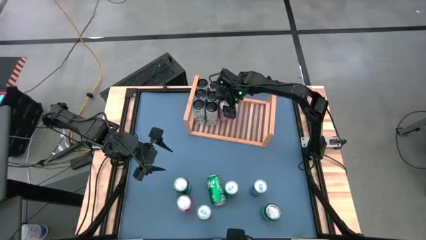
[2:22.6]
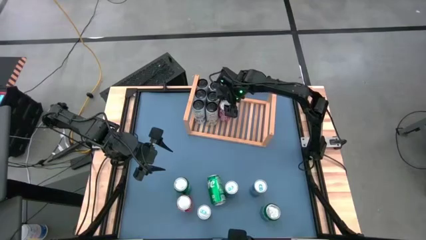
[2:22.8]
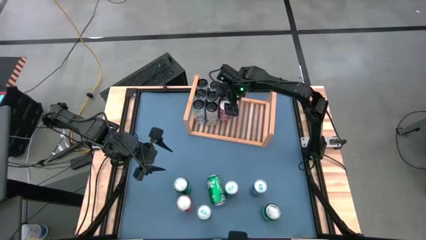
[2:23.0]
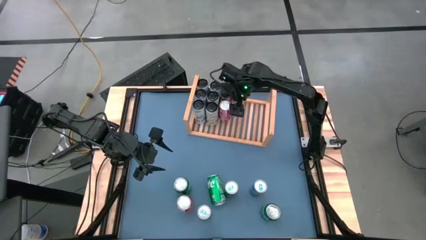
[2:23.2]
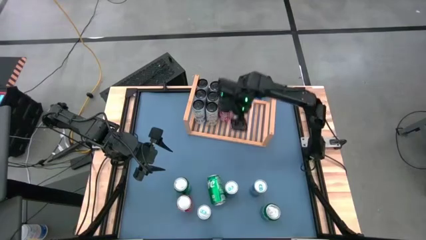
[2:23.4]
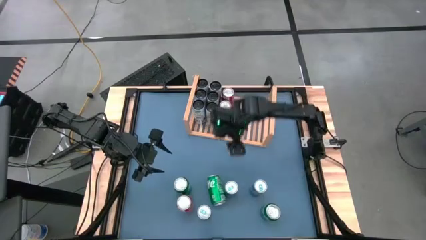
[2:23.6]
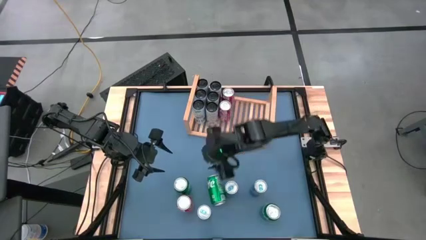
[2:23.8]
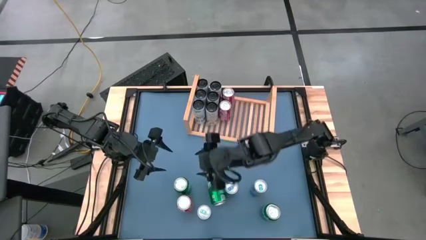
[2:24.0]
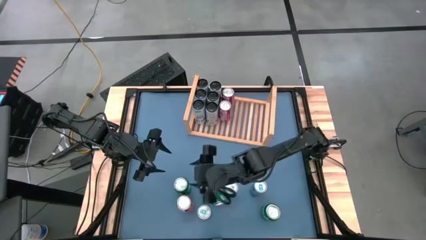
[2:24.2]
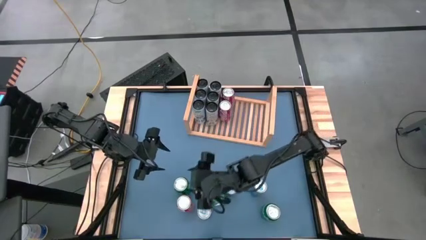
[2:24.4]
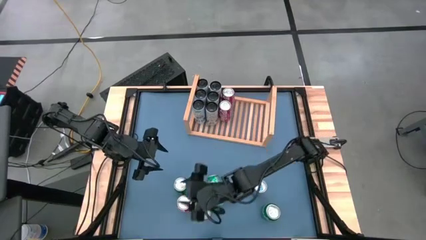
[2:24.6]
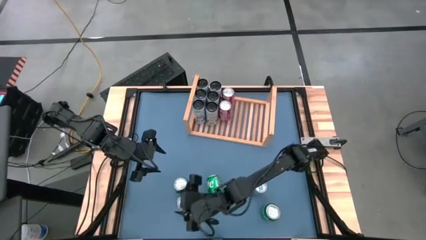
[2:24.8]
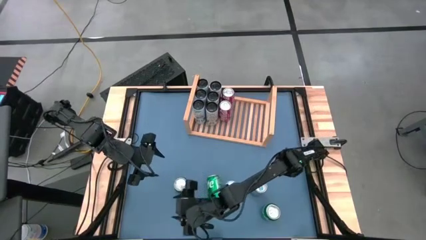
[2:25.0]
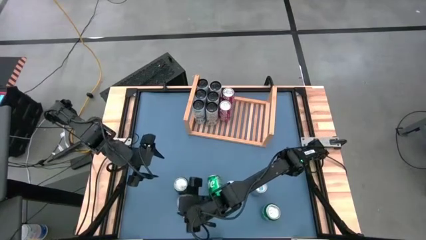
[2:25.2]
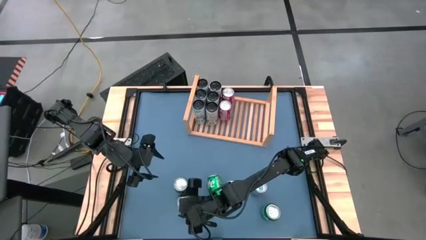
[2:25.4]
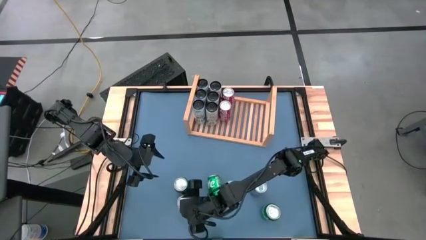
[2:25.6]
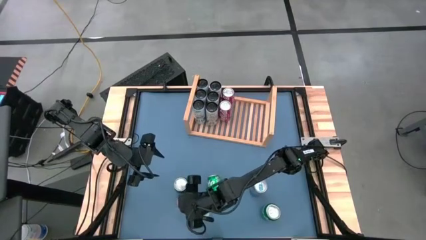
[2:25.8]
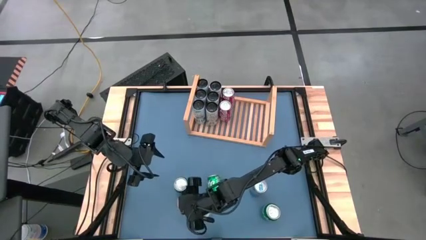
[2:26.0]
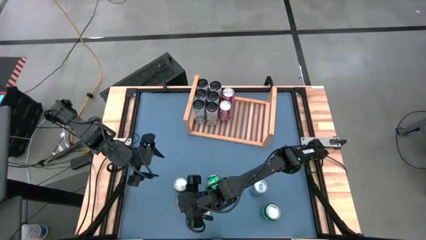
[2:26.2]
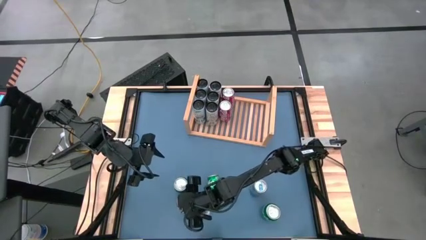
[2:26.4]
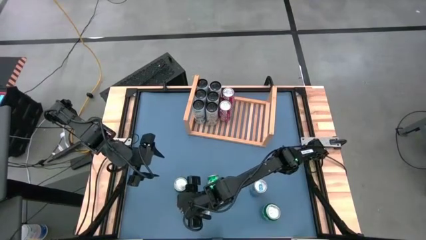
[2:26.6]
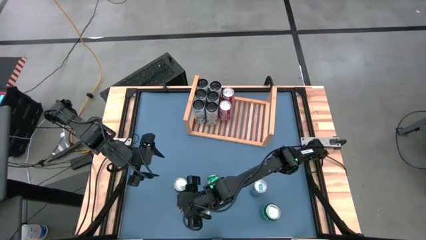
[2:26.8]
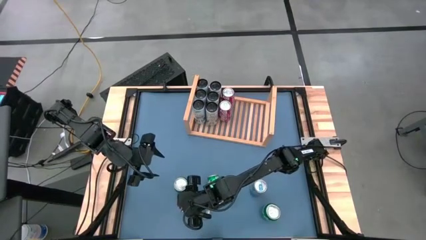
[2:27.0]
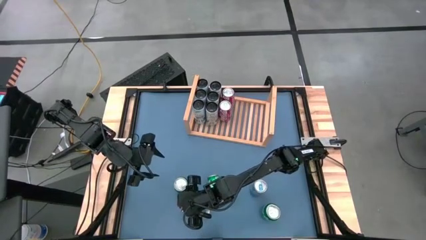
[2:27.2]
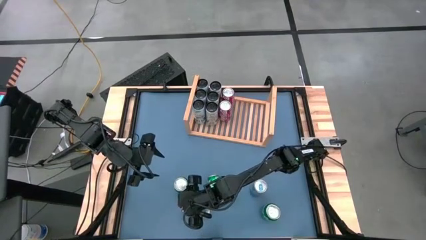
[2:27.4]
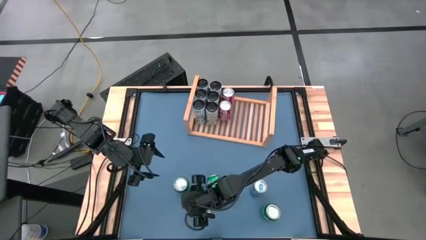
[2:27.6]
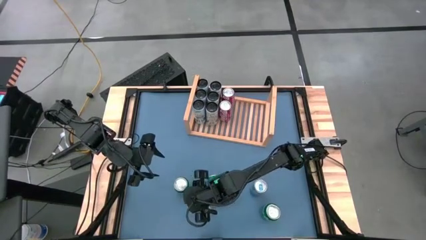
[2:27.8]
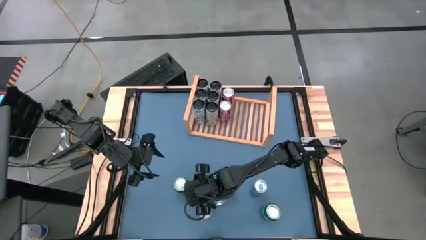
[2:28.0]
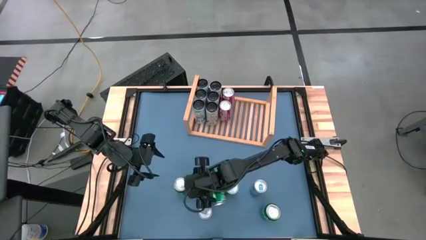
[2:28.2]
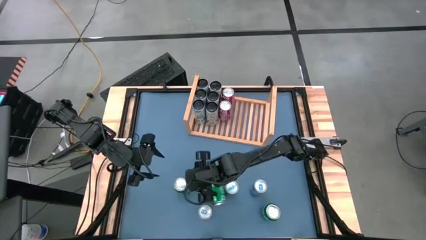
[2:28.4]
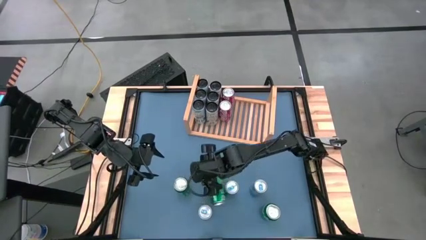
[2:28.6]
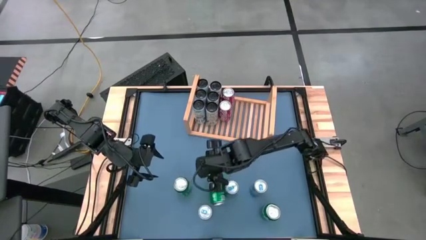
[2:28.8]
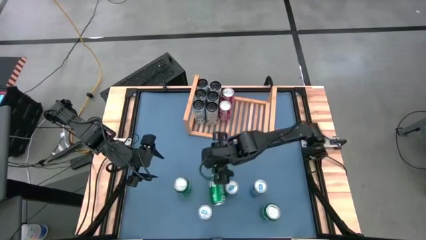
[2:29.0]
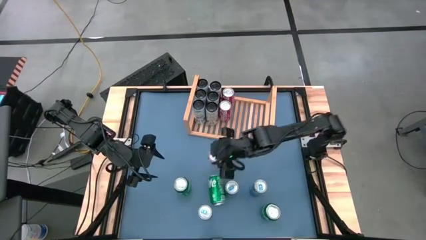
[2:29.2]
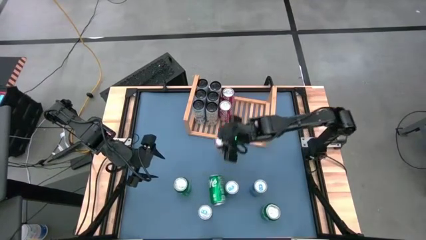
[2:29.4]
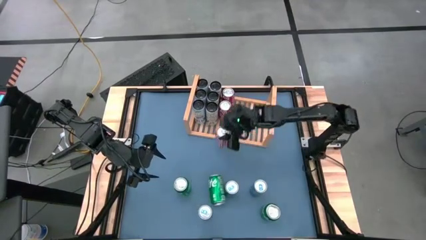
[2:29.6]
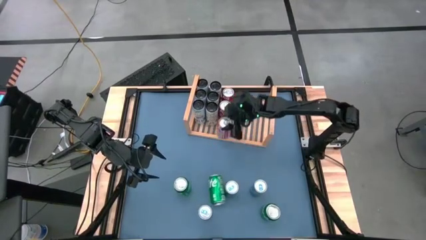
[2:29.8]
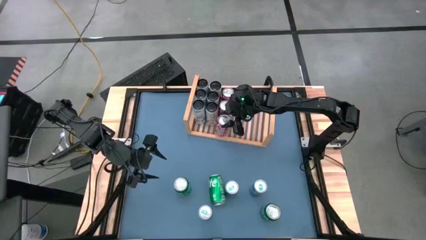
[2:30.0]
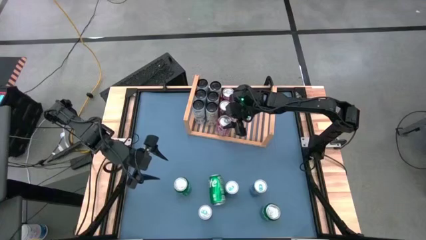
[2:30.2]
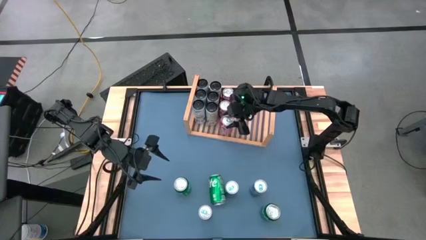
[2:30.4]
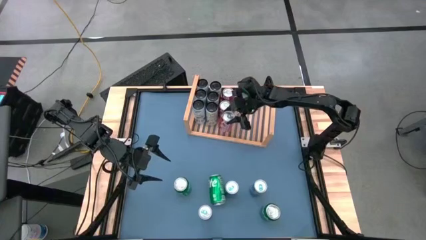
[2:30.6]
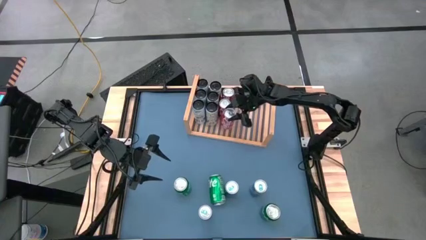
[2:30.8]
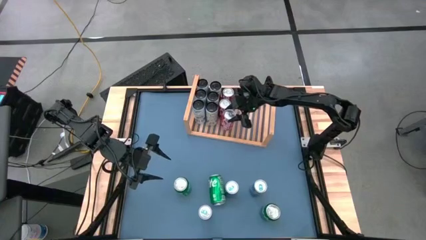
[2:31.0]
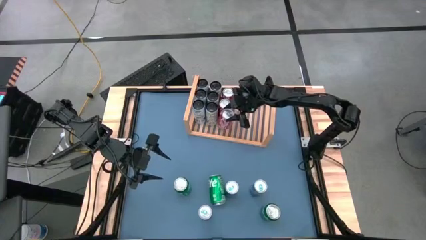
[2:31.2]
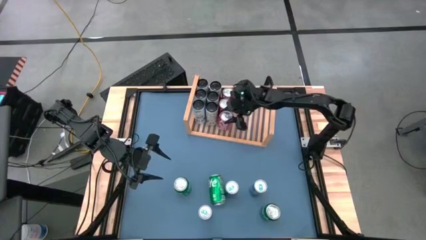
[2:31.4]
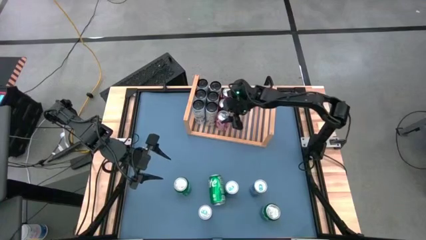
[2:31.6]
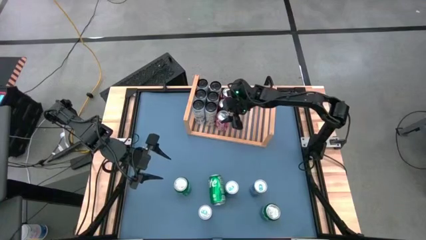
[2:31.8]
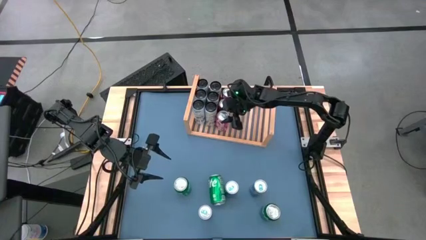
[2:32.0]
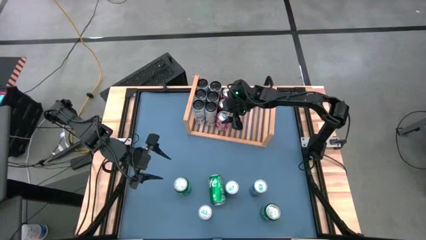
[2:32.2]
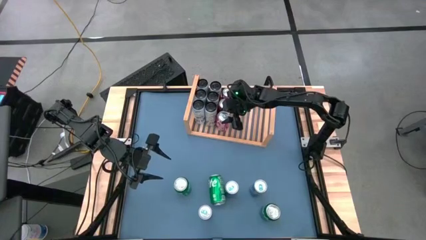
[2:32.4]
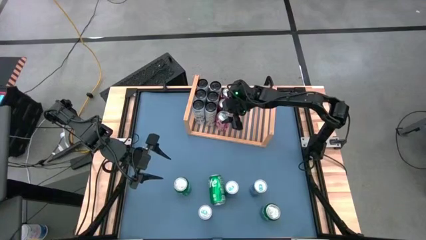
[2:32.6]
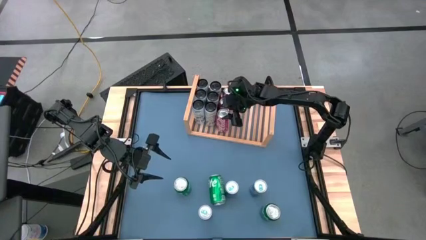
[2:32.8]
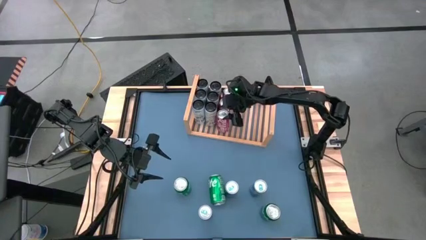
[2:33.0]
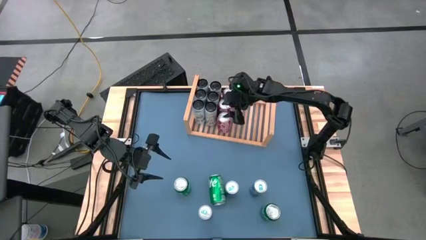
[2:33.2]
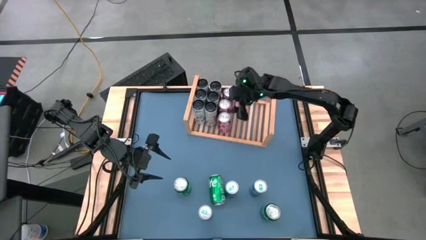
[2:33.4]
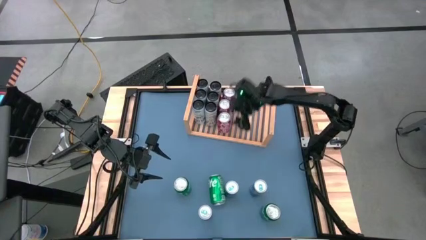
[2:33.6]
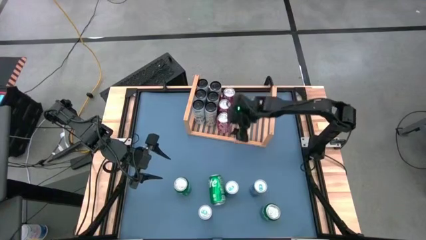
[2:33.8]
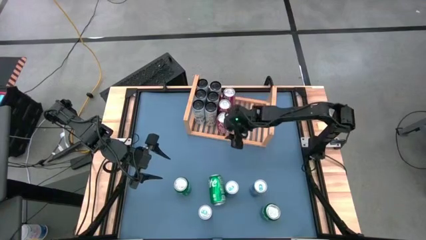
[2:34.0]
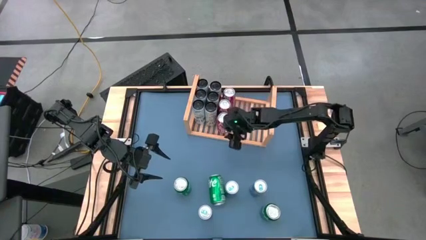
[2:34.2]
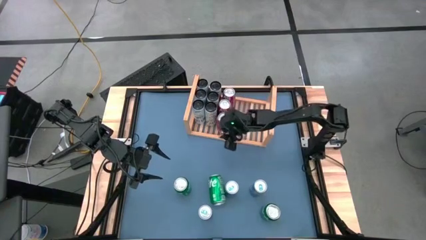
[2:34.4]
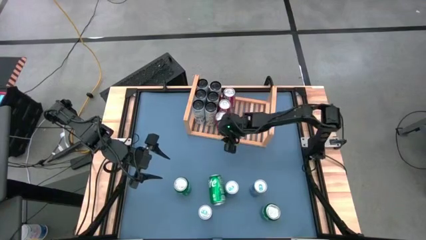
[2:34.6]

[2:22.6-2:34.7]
Task: Place canned beverage on shelf
Put the red soda can on the shelf aligned with the other red soda can

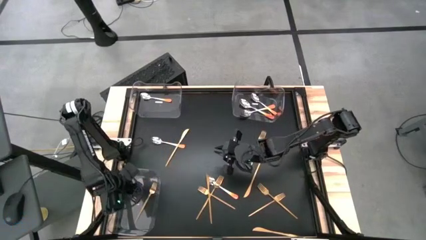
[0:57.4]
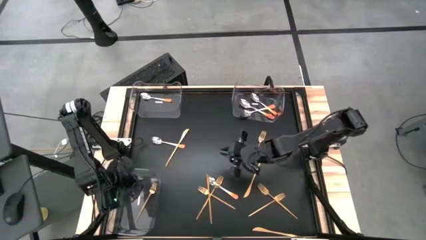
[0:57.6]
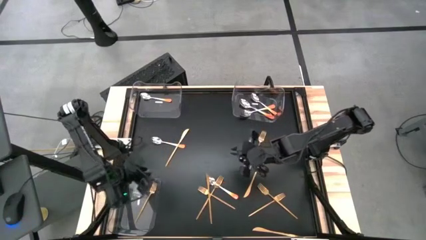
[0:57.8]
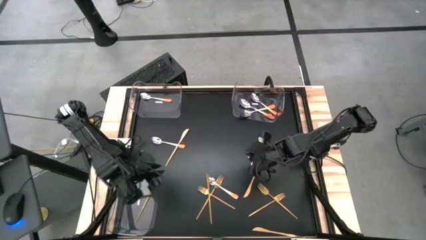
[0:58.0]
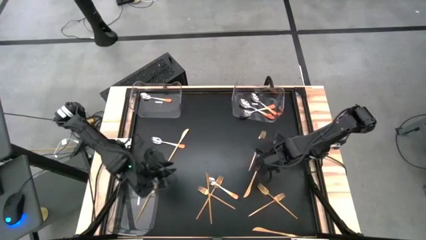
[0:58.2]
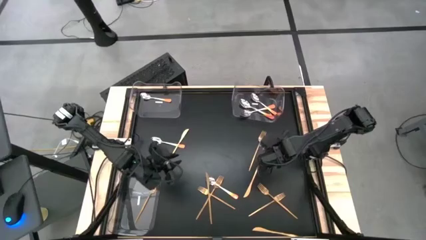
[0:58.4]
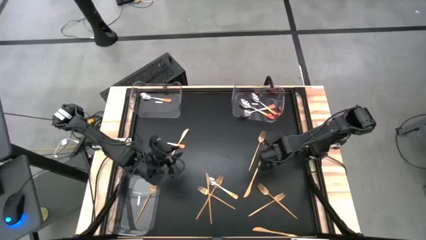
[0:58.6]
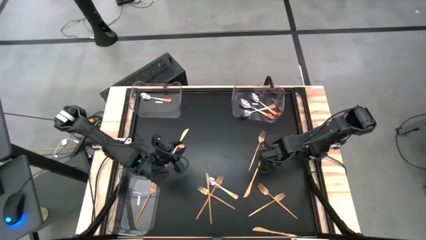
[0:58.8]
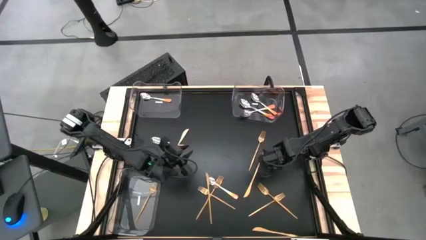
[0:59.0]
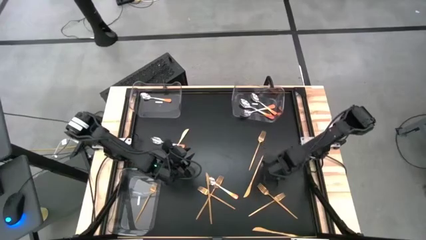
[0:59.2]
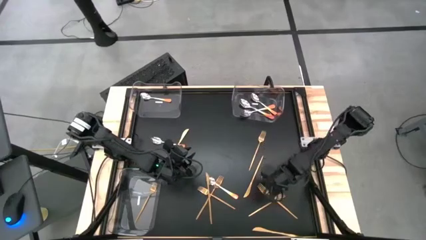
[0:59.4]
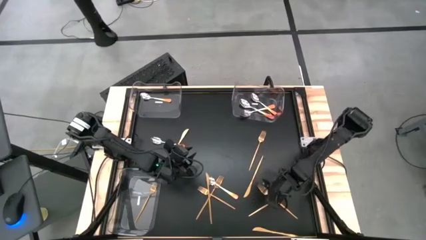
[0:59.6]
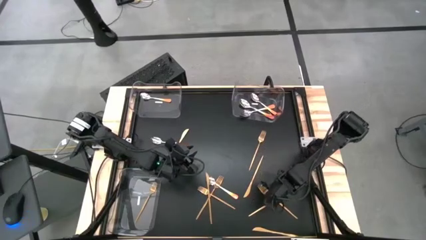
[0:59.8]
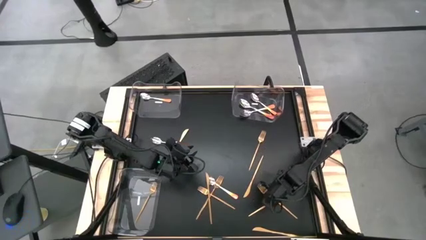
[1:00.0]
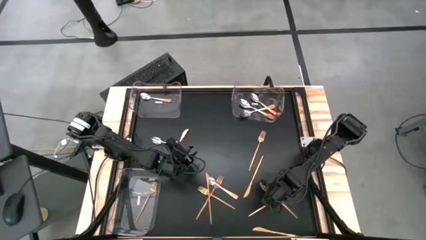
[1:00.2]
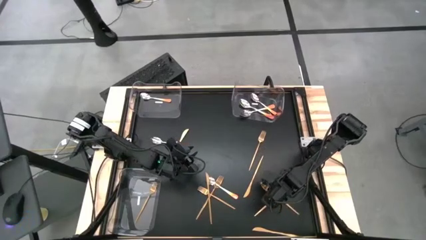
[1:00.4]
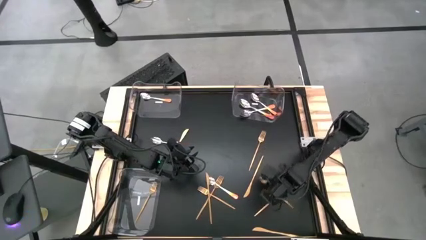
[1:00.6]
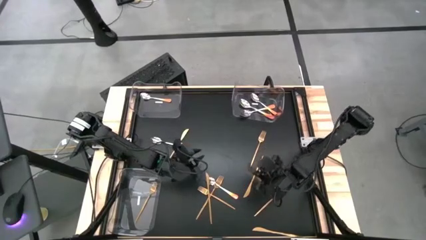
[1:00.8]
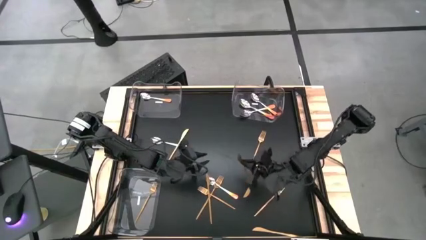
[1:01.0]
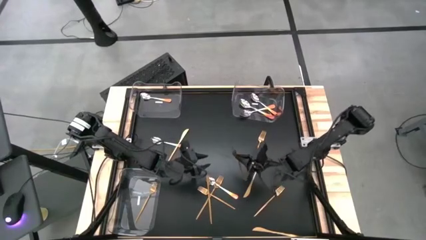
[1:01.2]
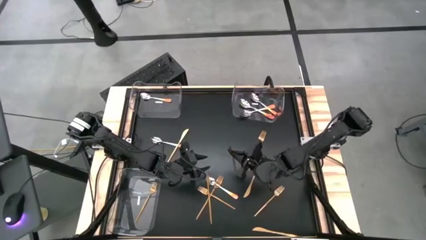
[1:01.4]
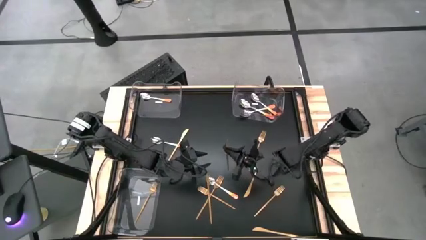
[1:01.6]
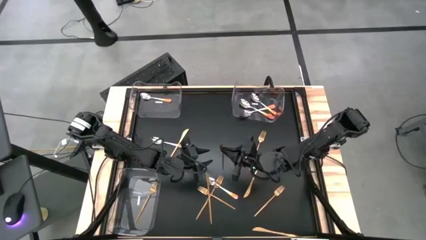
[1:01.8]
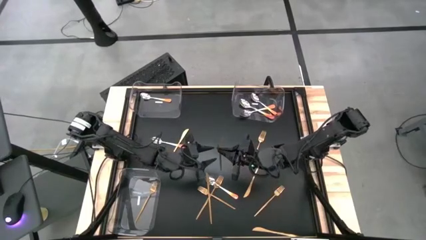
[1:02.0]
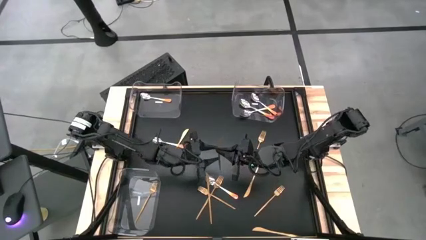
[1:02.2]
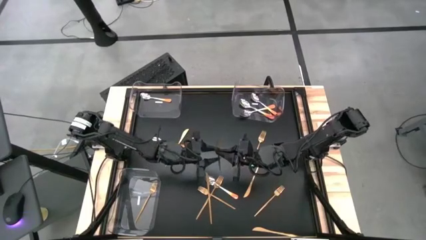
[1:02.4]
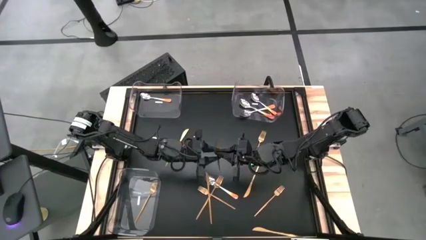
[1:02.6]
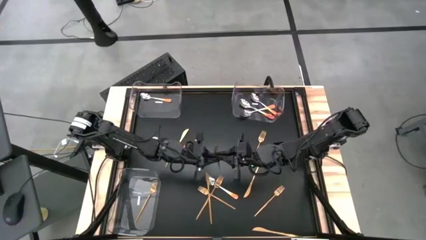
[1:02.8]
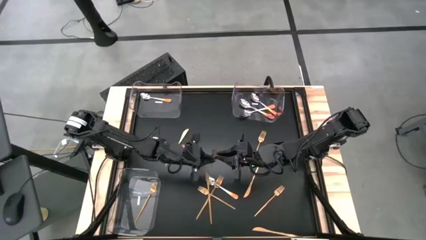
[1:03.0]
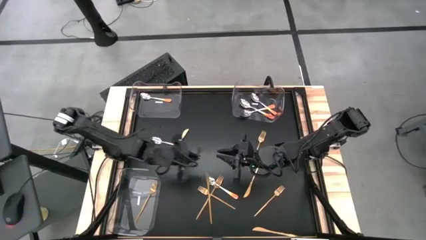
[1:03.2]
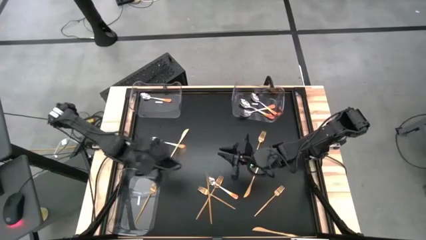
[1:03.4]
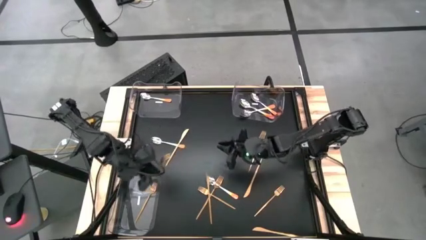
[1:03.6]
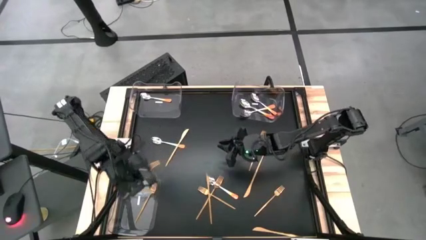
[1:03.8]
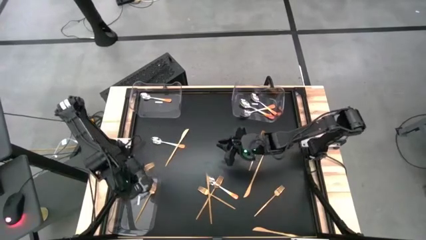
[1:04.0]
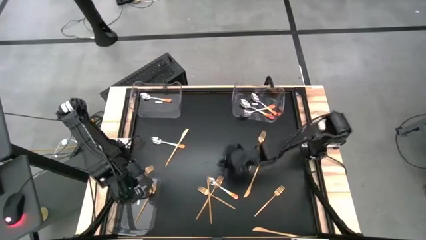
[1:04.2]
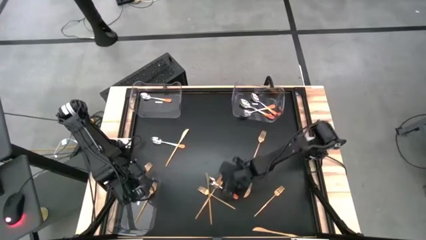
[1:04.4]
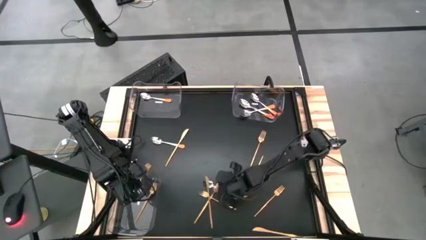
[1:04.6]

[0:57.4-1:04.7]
Task: Sort silverware by color (type)
Put the gold fork into the bottom left transparent bin
